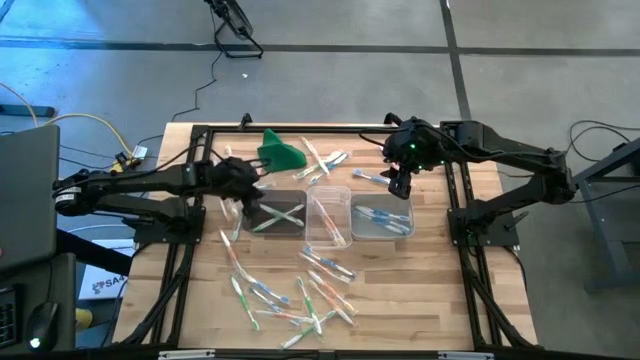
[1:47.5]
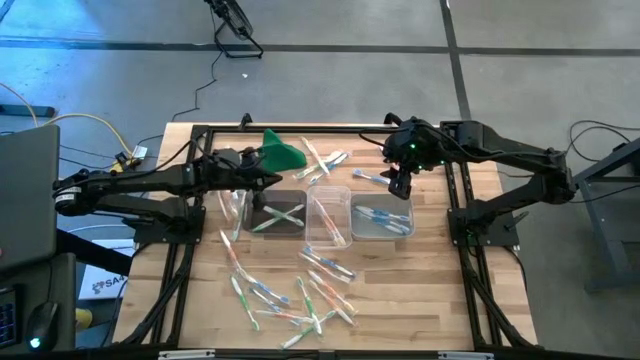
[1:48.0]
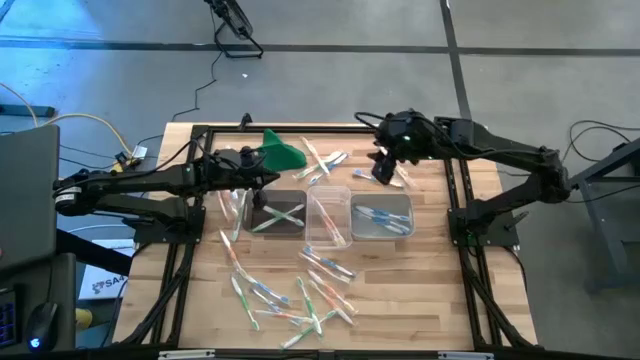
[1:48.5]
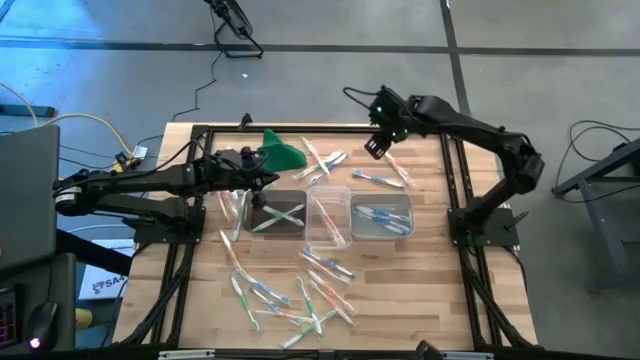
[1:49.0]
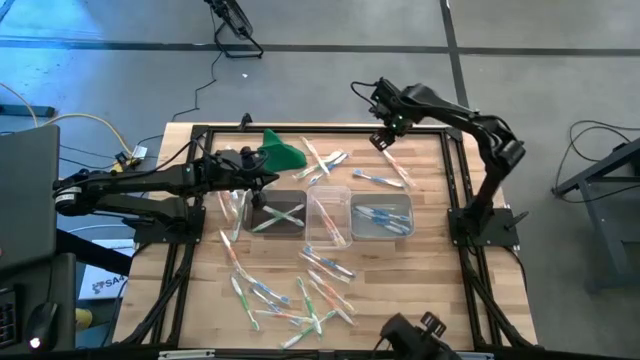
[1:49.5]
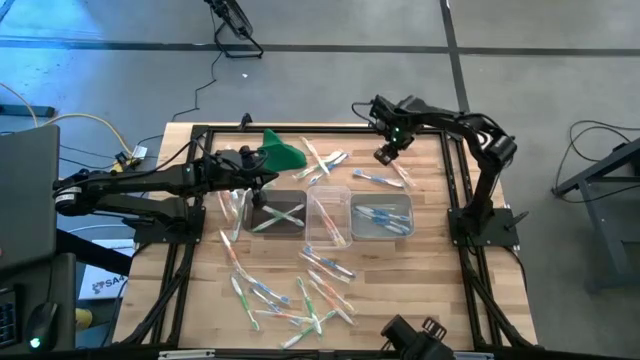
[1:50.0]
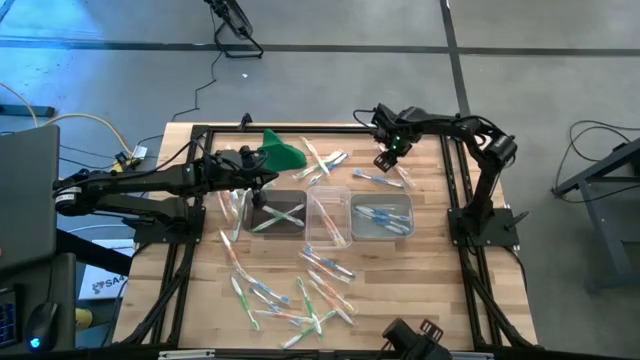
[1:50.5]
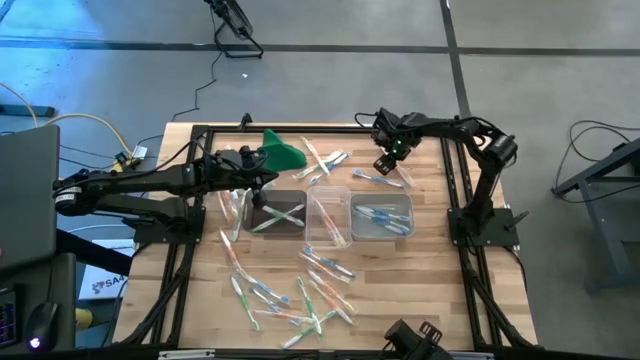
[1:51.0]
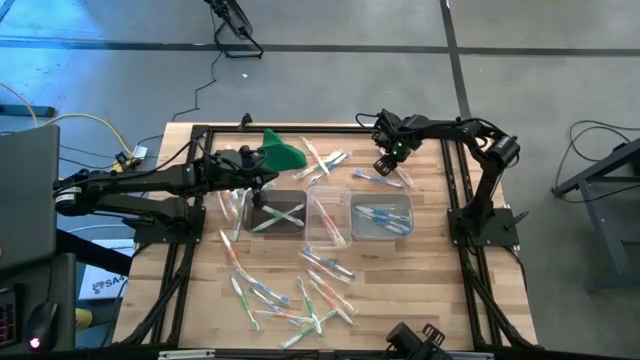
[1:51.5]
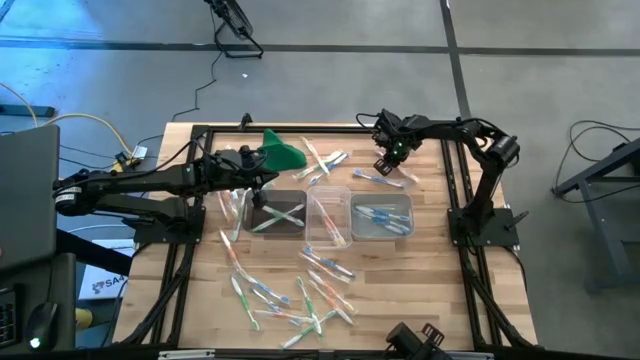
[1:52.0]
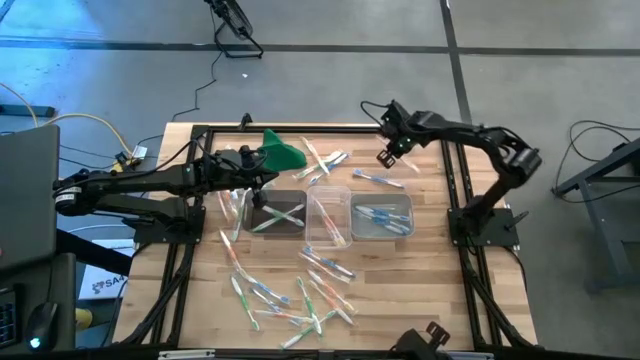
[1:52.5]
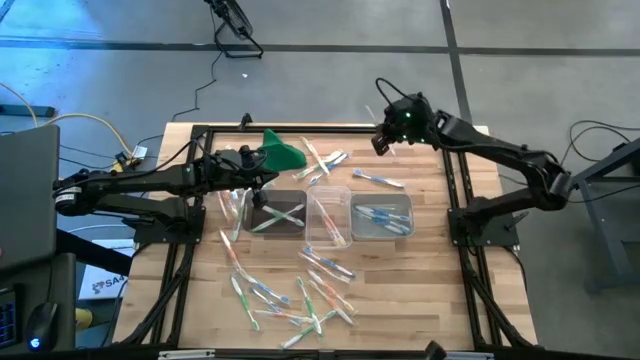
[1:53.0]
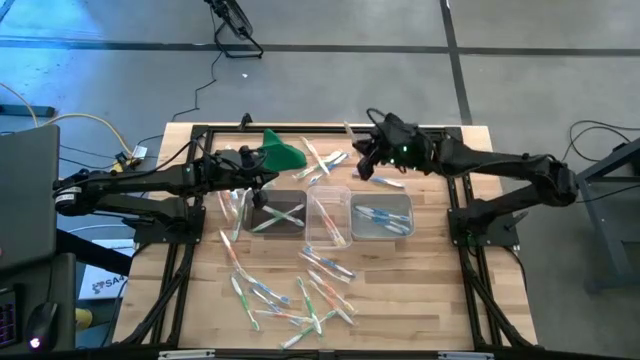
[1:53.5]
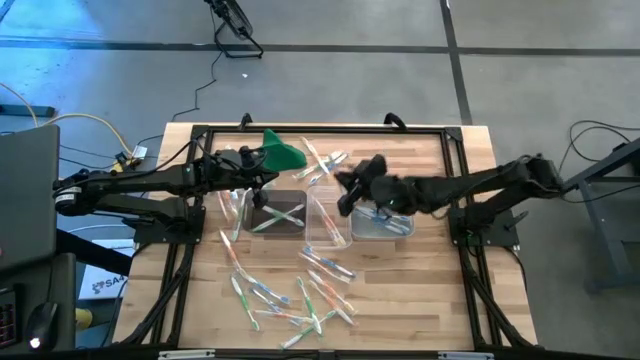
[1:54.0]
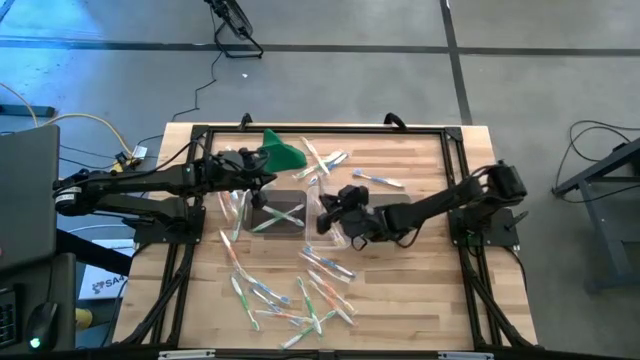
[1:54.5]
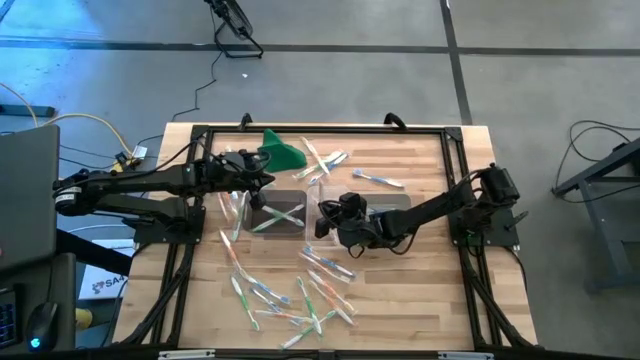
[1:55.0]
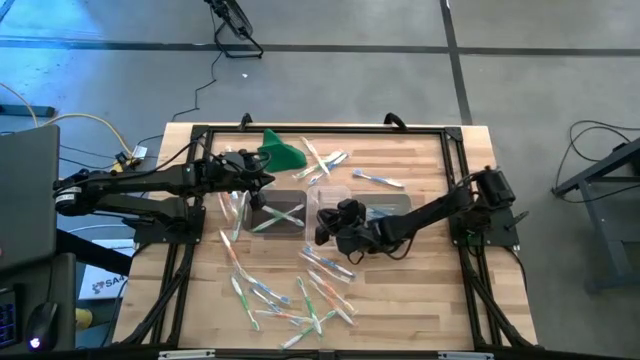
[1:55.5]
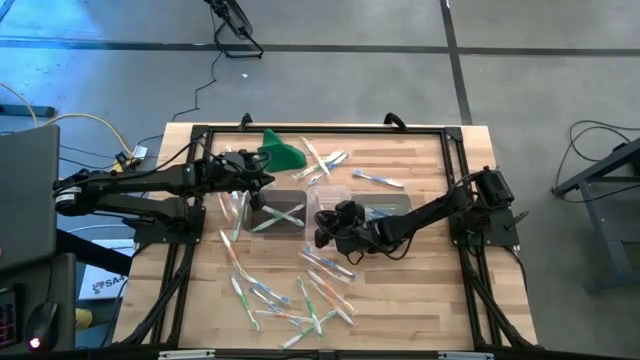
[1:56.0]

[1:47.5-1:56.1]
Task: Pick & Place Toothbrushes
Put the orange toothbrush into the transparent bin

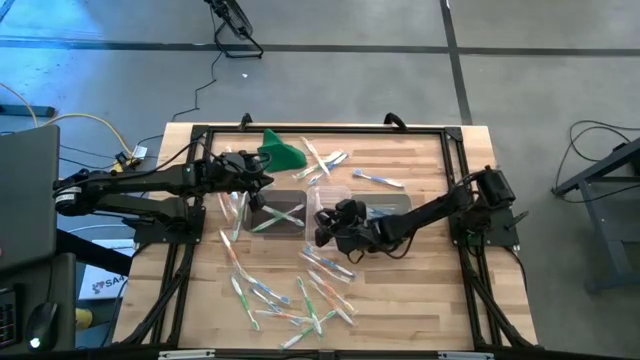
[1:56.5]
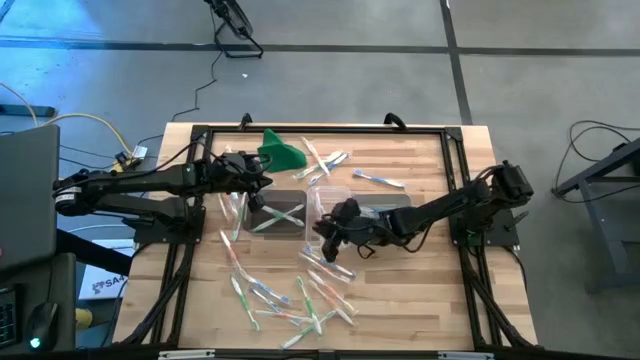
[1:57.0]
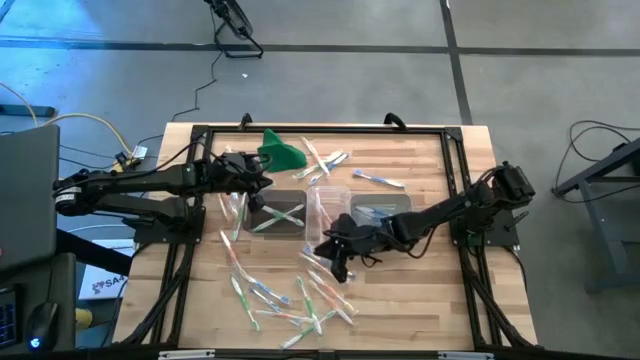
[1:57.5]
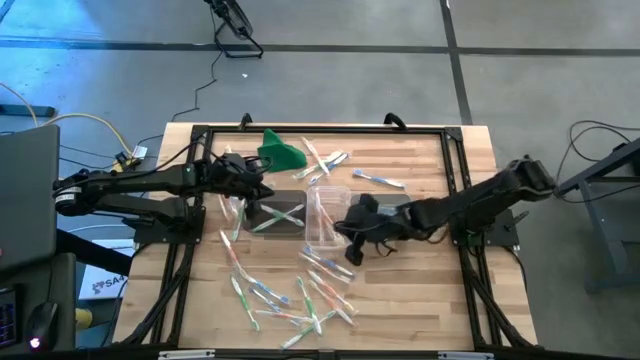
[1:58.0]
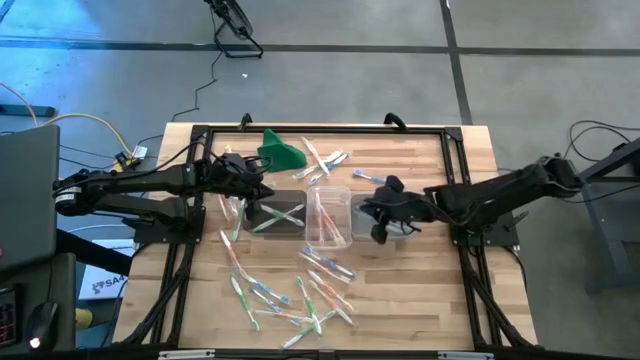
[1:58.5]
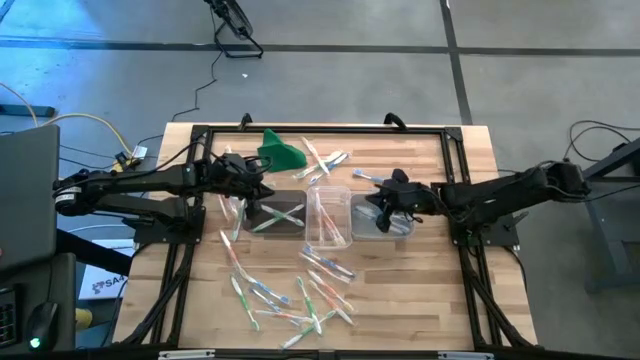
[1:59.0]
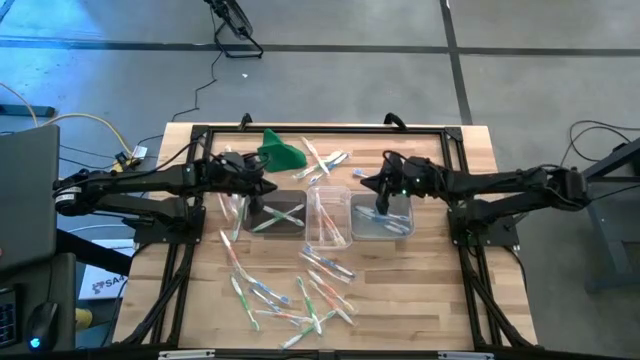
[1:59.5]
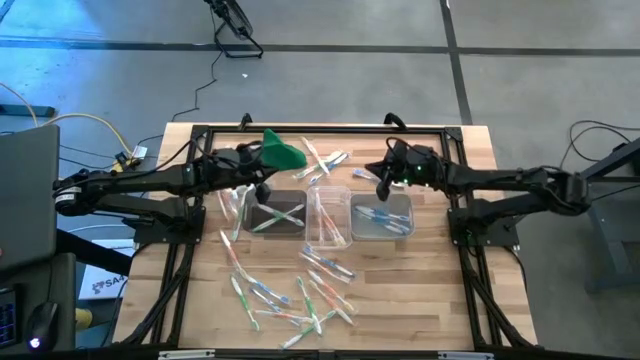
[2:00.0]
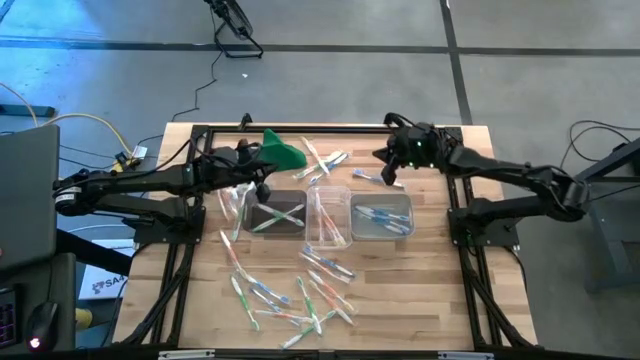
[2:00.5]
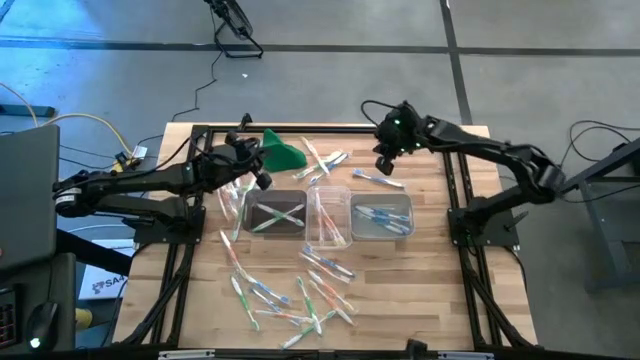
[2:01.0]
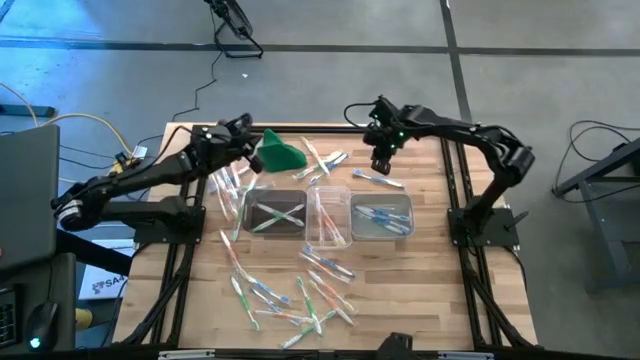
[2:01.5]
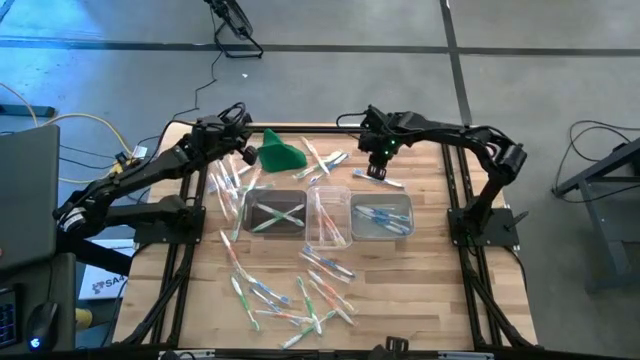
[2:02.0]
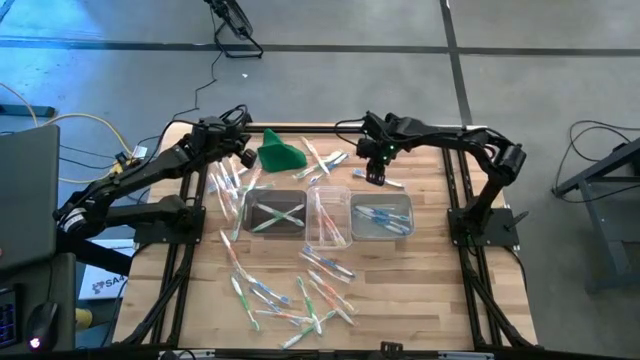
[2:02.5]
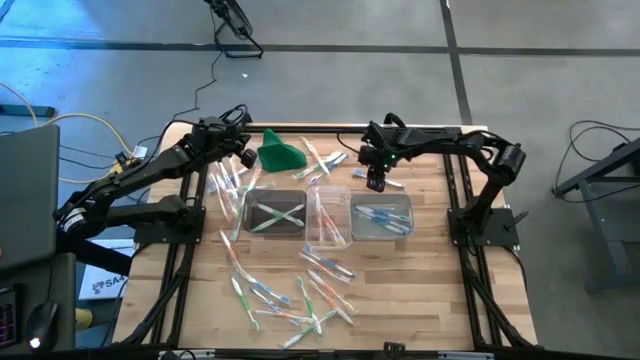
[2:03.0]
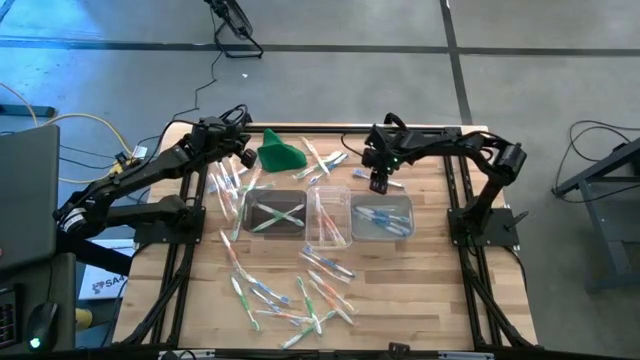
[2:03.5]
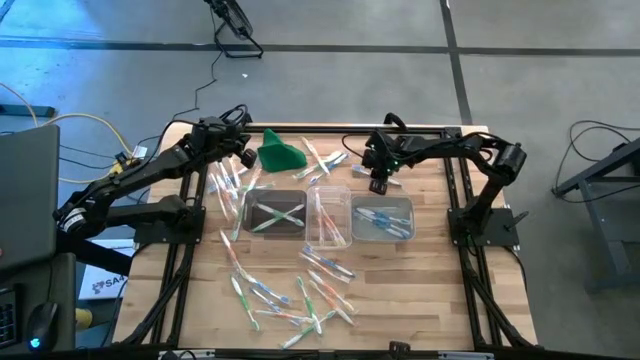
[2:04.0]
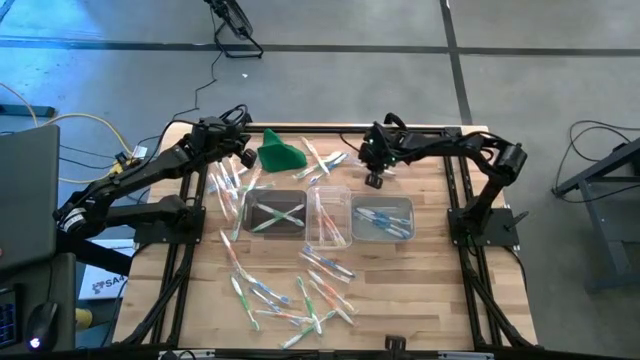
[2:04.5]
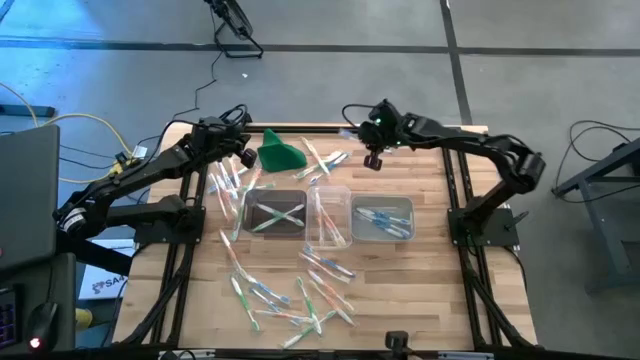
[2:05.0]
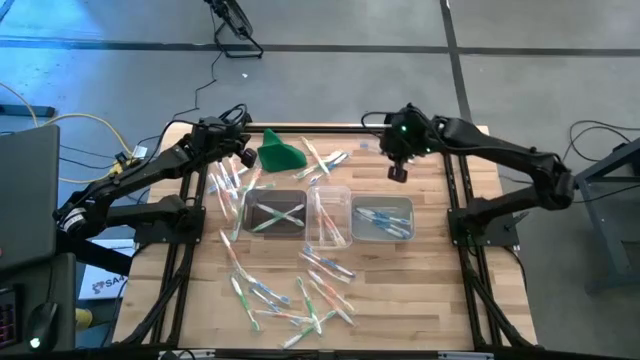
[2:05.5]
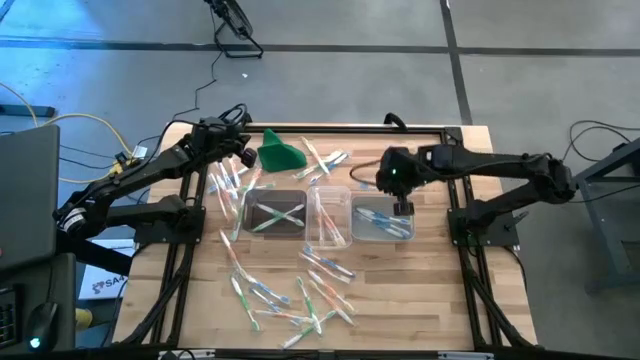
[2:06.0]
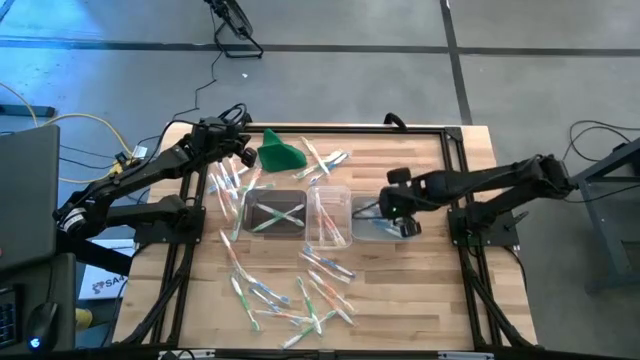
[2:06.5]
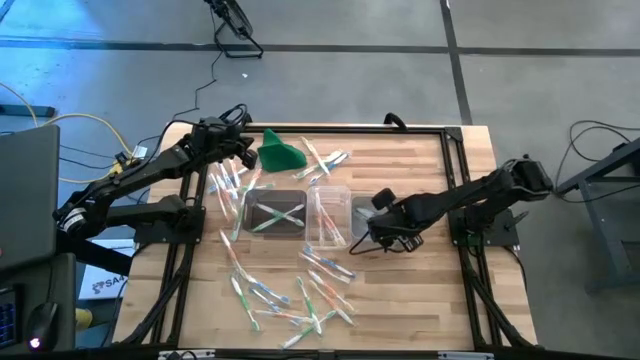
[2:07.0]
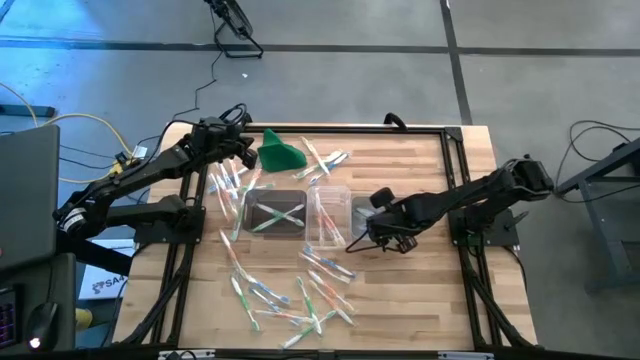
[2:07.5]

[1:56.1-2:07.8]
Put the blue toothbrush into the gray bin
